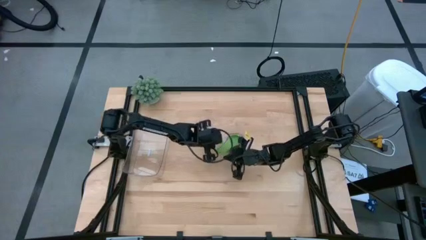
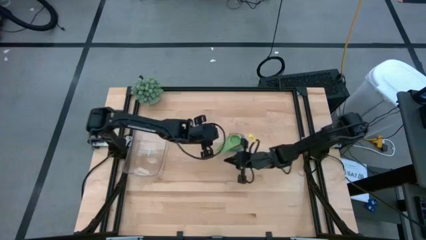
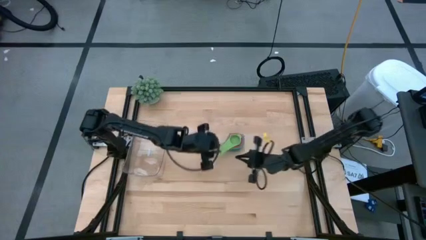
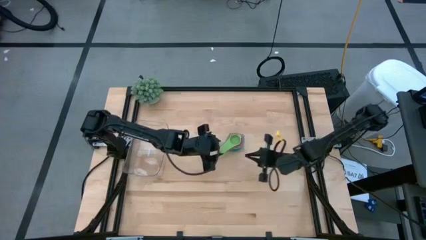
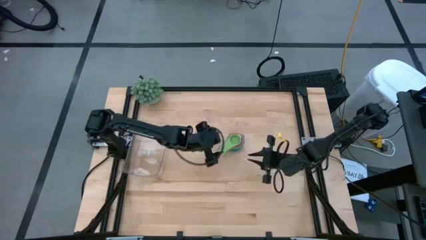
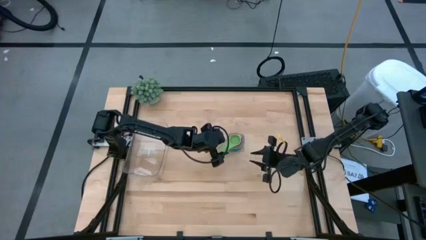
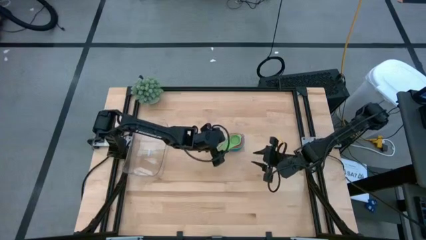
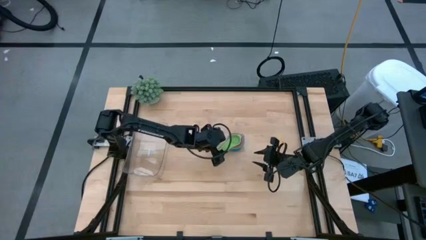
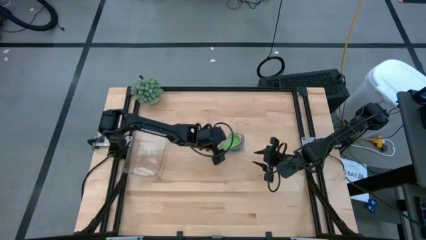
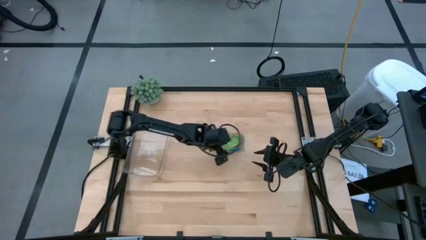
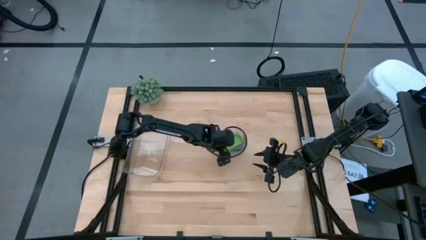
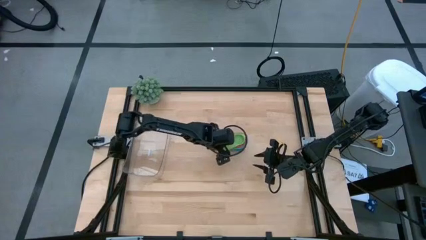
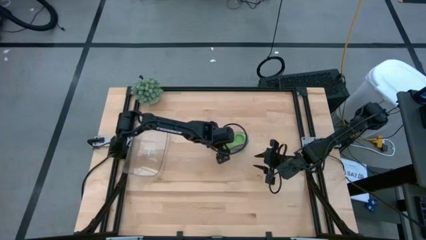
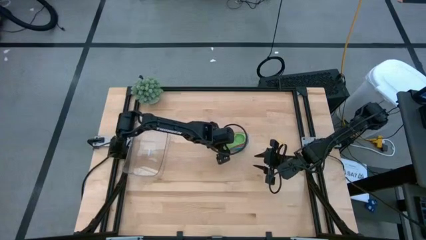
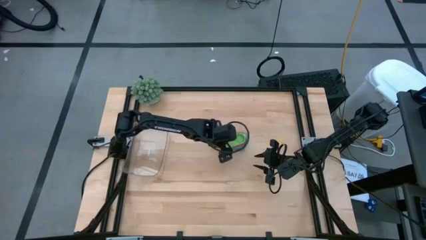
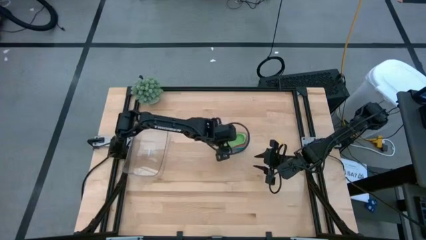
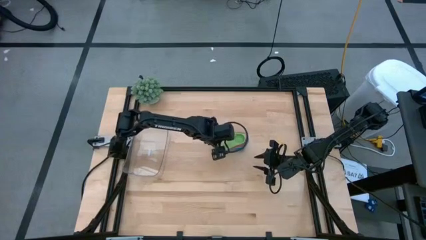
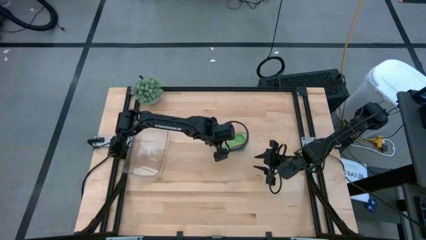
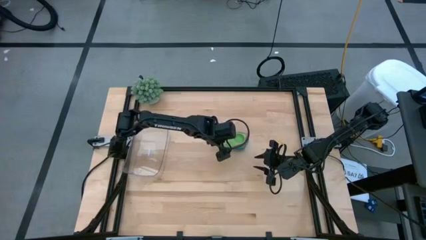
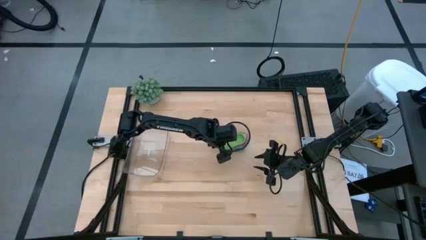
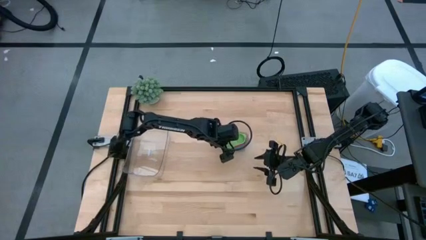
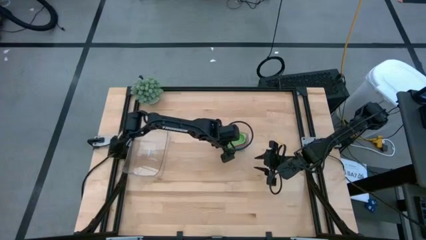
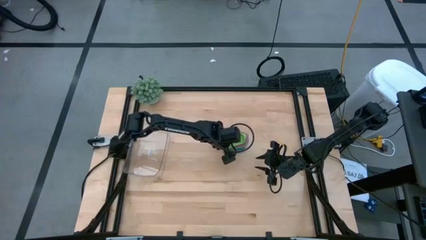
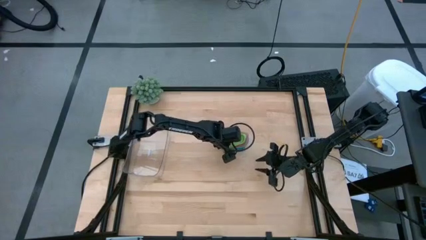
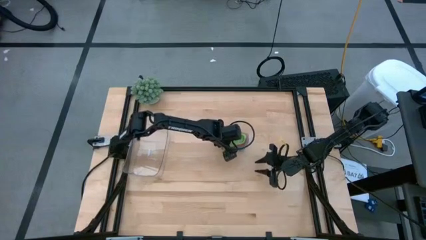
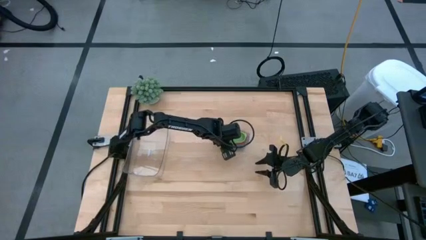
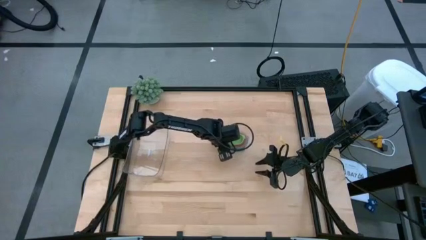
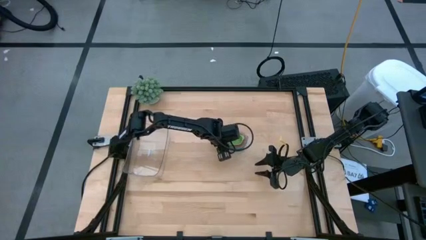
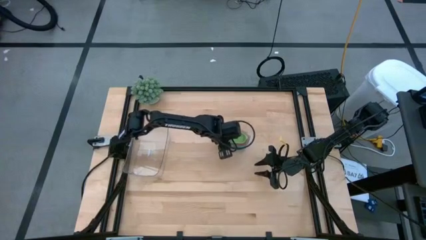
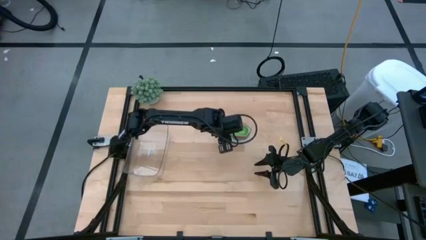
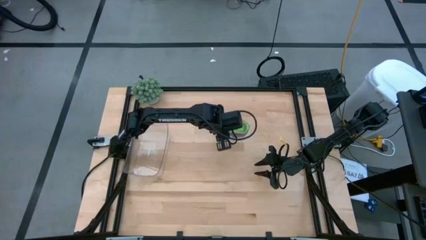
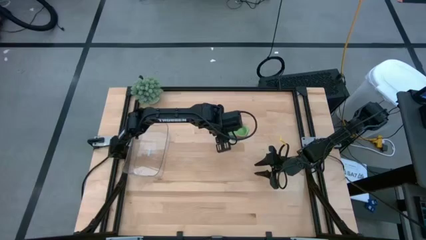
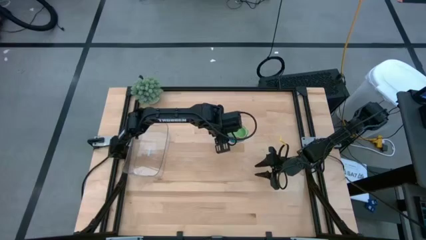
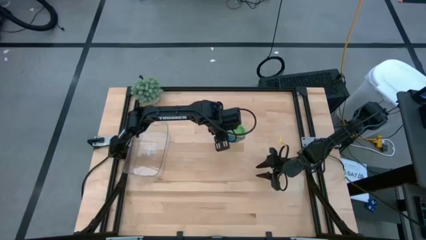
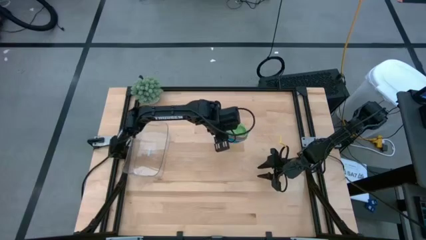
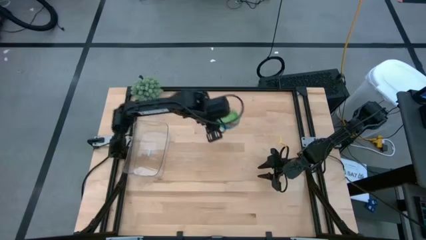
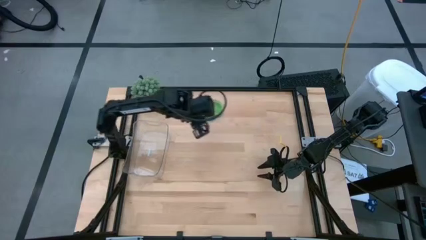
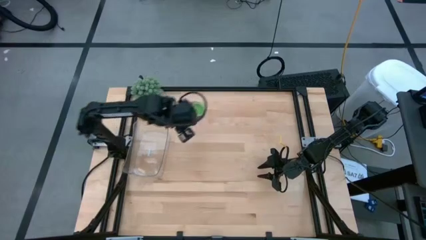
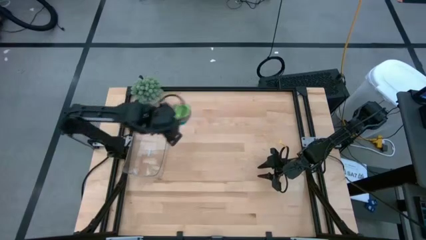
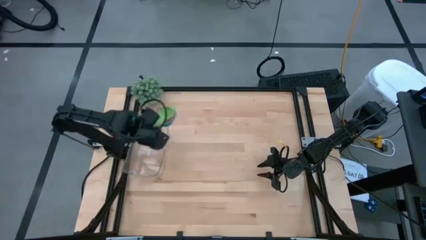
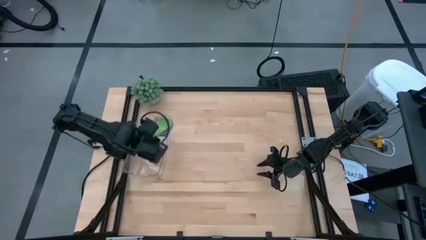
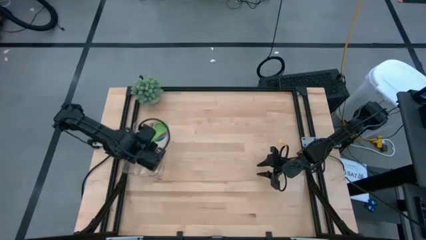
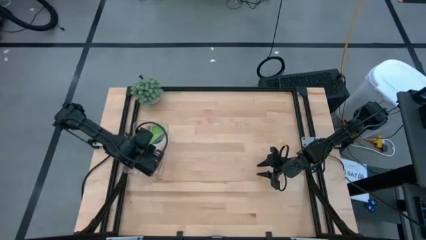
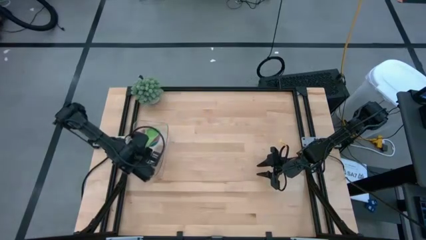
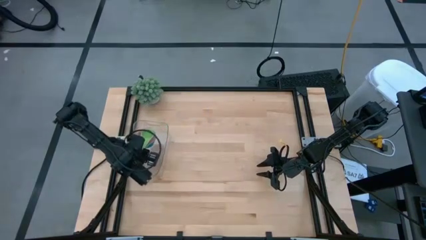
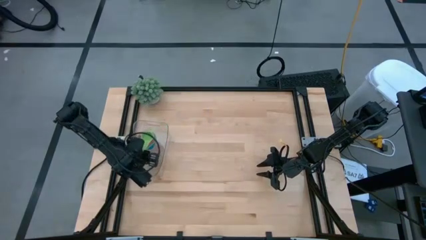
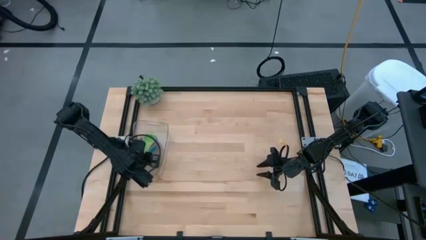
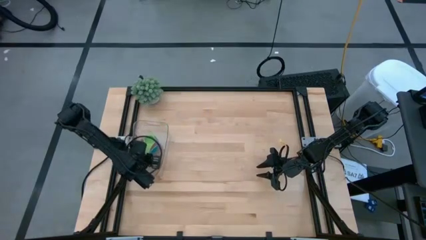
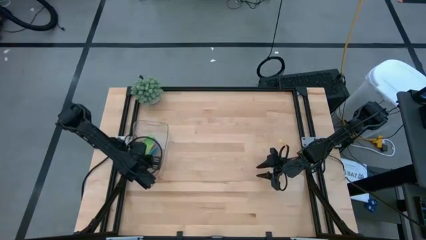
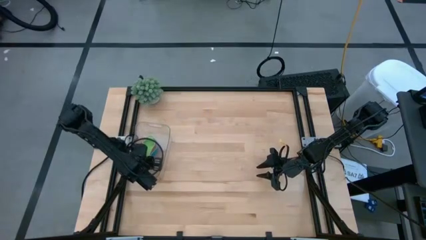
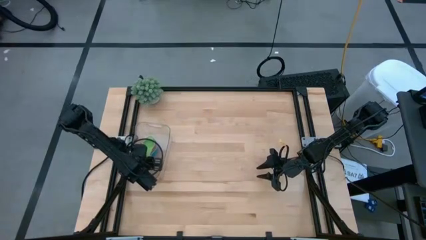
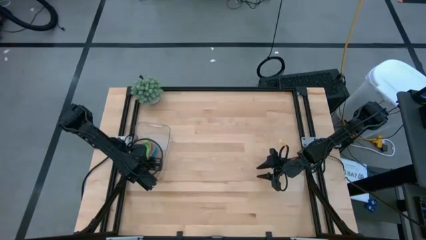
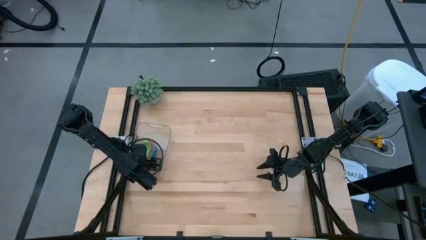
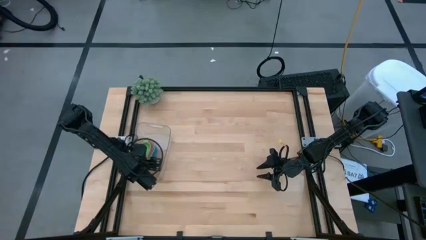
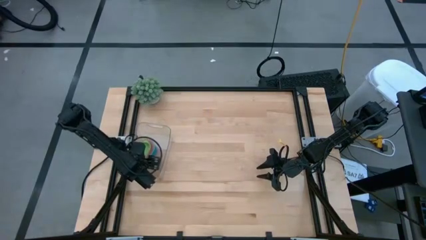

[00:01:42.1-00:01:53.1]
Task: Nest measuring cups in basket
Put the stacked measuring cup into the transparent bin

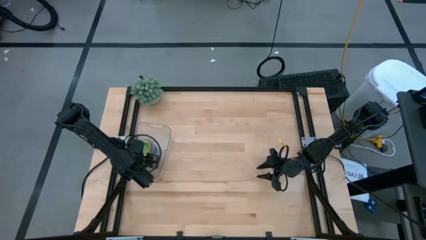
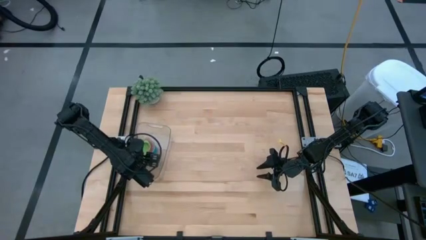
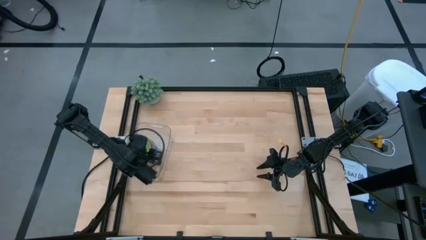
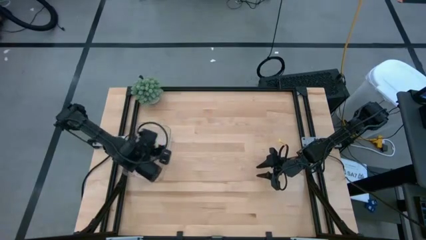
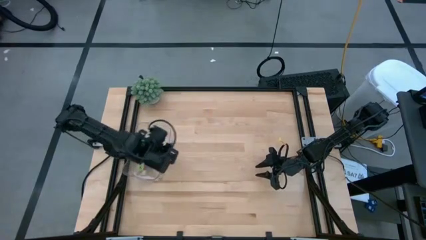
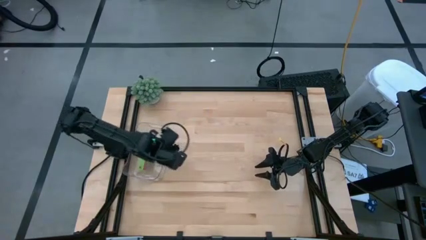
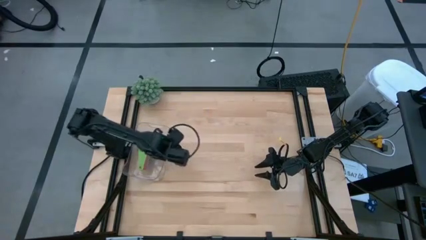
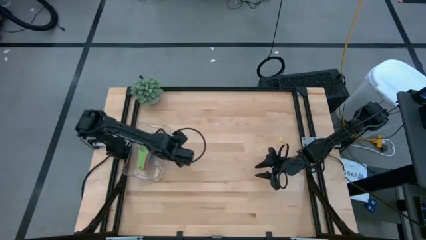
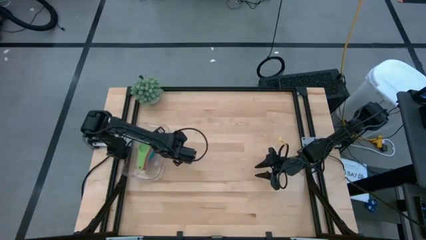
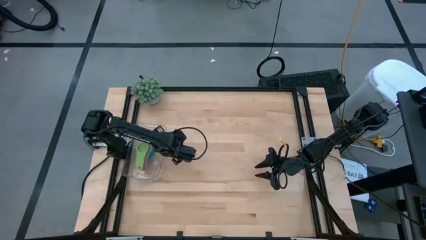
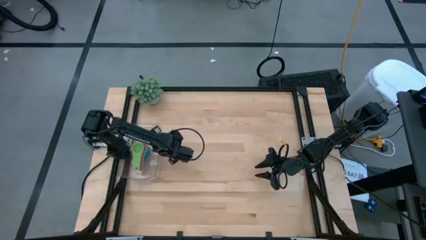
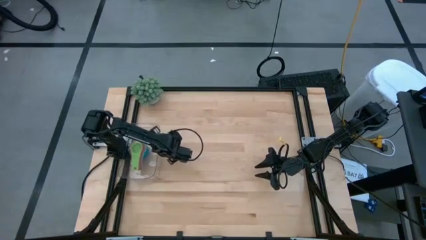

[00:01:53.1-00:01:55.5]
Adjust the transparent bin on the table

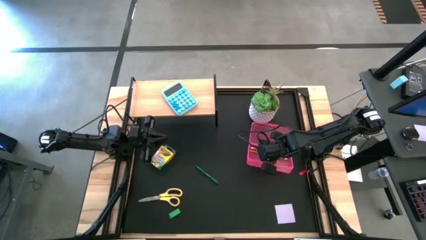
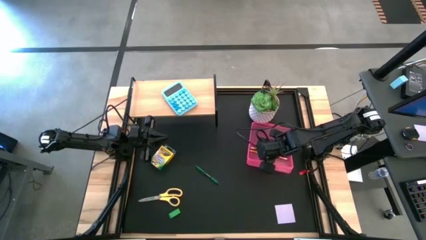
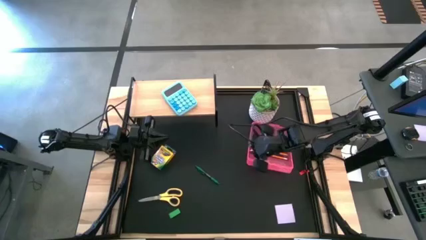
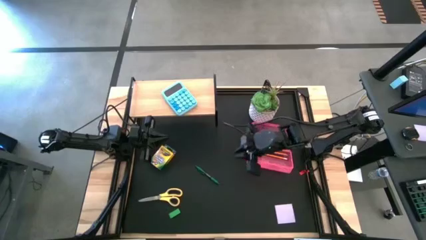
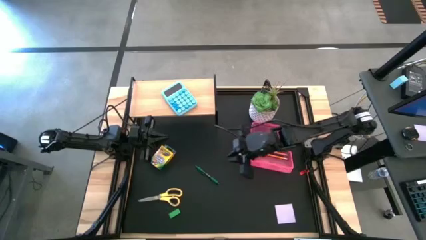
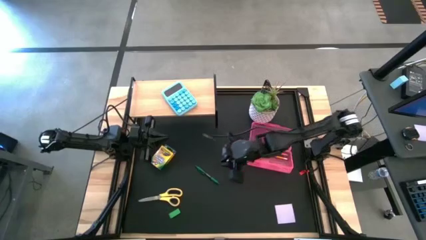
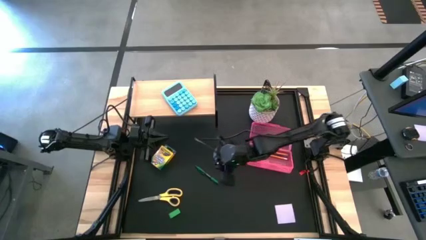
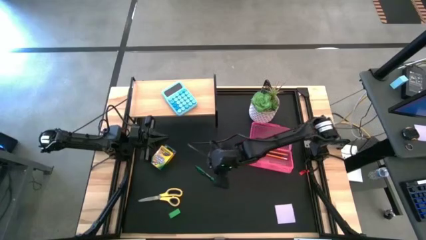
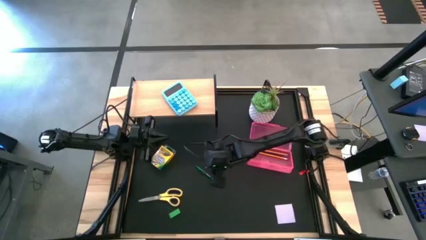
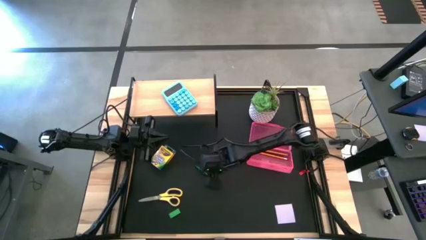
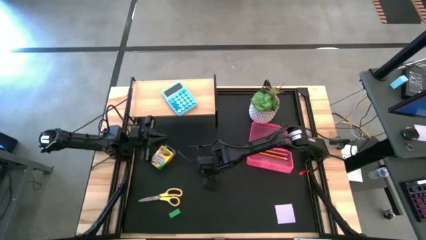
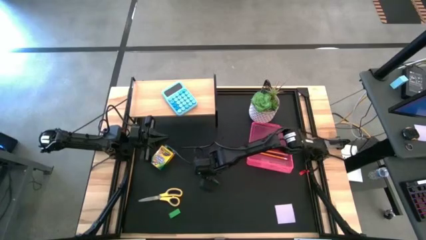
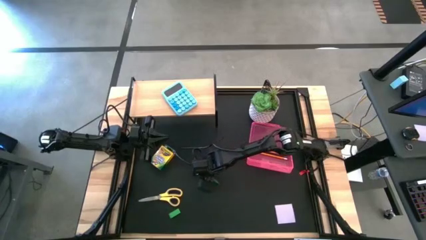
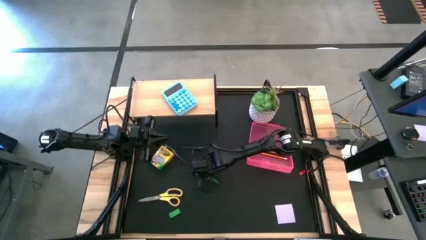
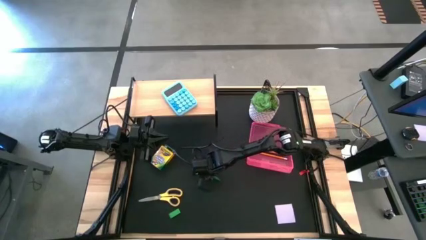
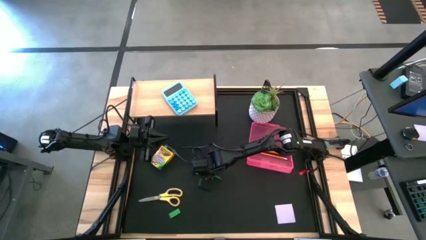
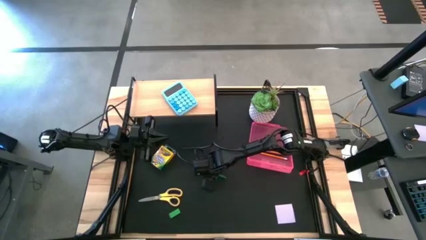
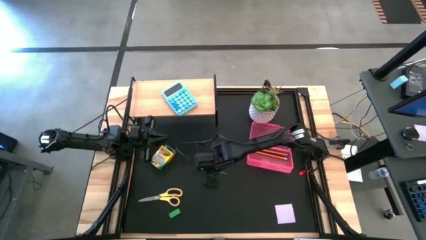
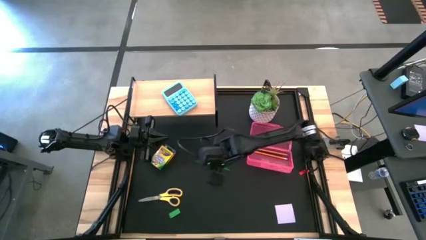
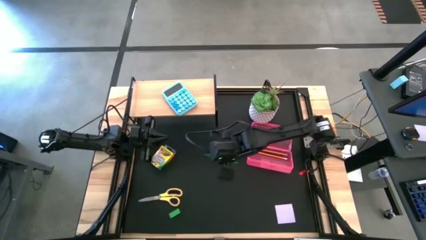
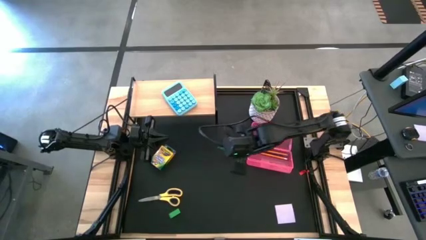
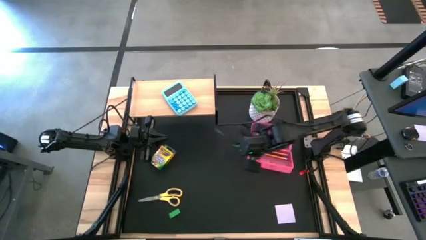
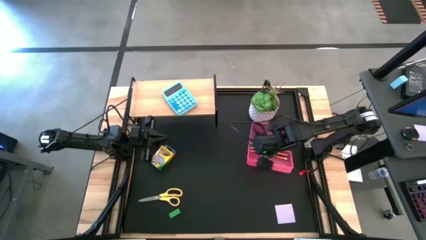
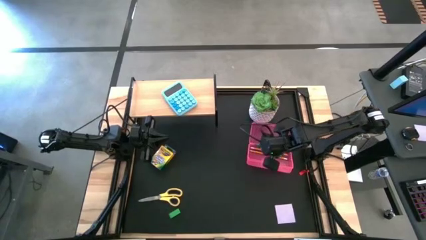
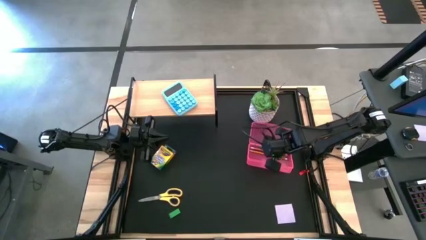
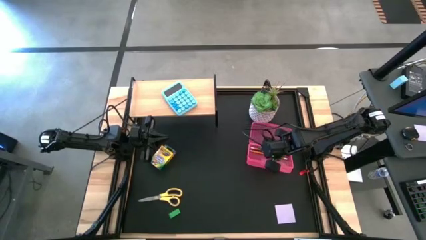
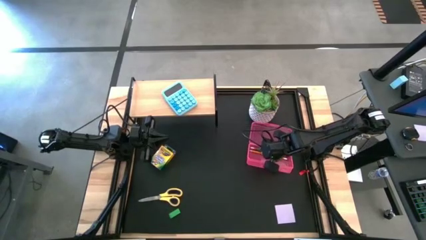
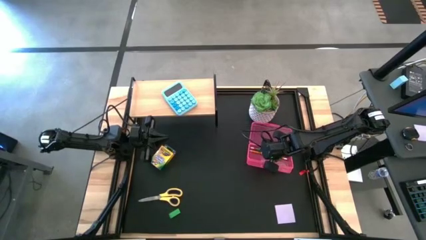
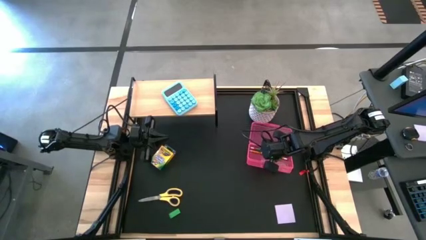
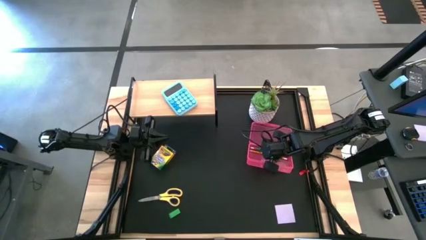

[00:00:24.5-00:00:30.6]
Task: Pack school essentials
Put the green pen into the pink supply box
